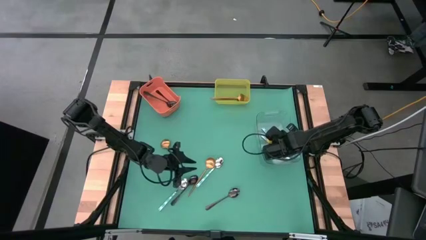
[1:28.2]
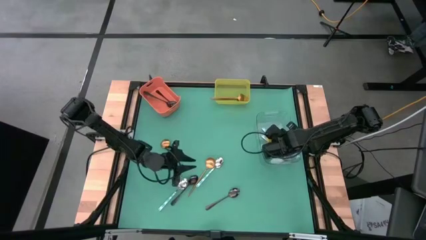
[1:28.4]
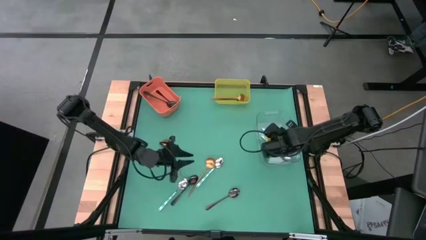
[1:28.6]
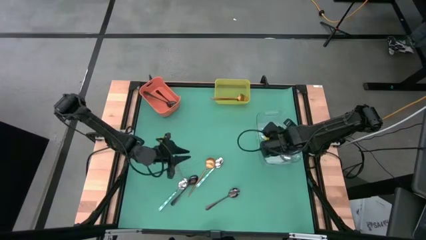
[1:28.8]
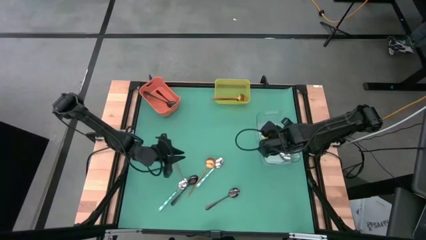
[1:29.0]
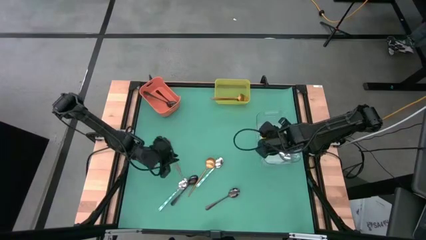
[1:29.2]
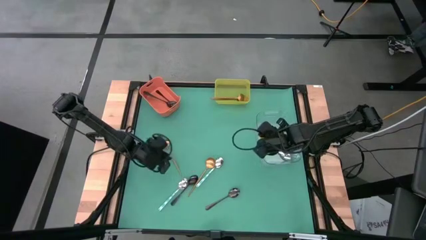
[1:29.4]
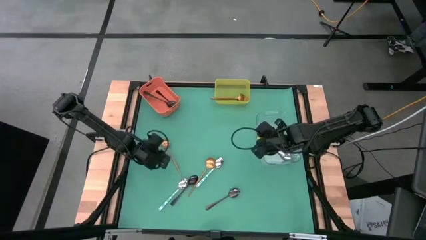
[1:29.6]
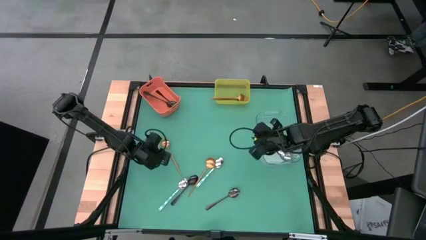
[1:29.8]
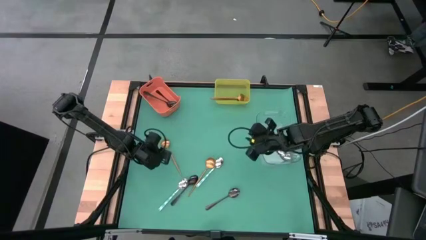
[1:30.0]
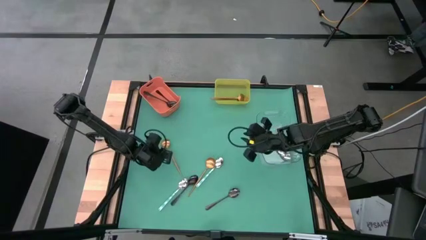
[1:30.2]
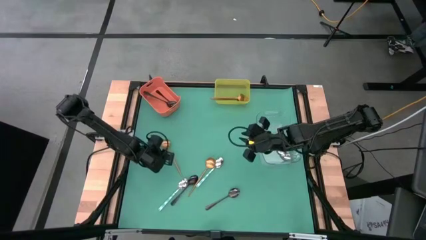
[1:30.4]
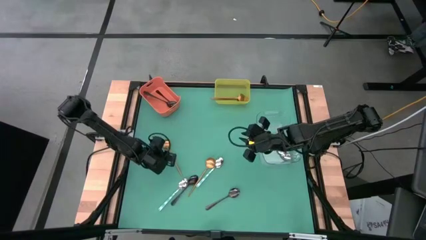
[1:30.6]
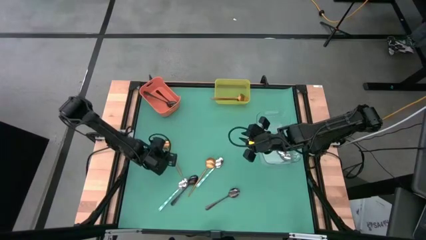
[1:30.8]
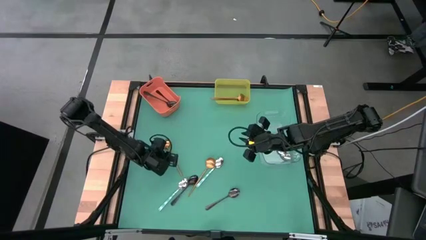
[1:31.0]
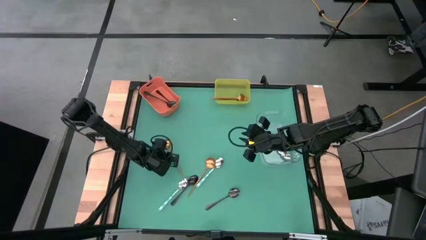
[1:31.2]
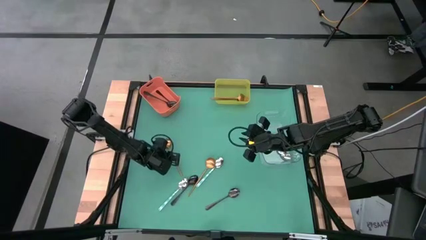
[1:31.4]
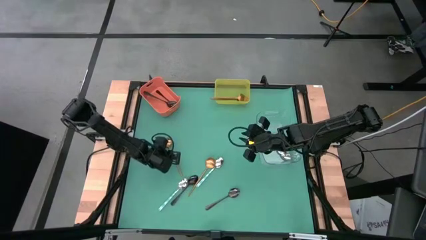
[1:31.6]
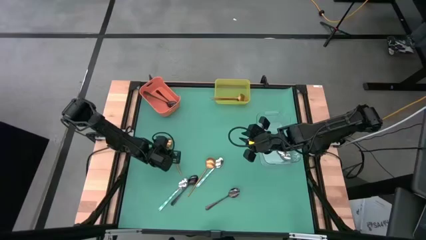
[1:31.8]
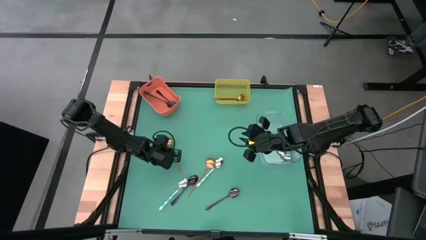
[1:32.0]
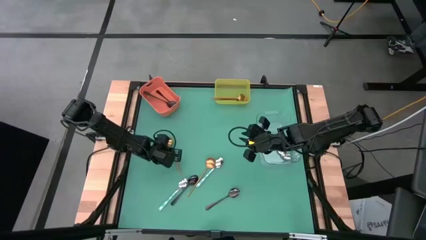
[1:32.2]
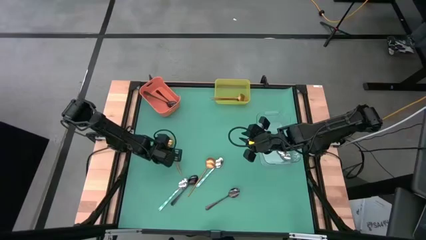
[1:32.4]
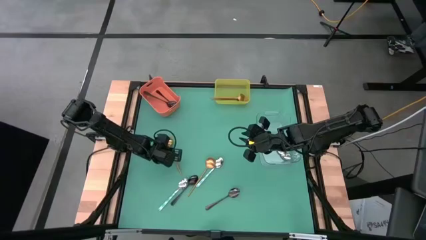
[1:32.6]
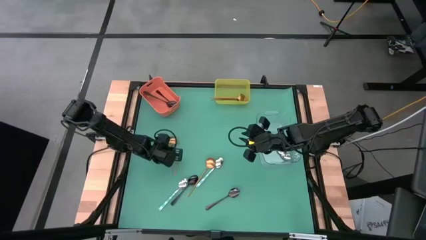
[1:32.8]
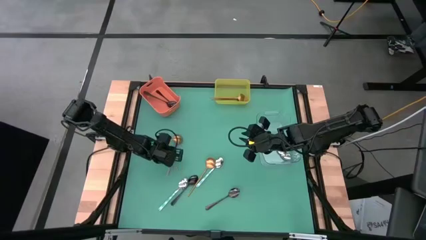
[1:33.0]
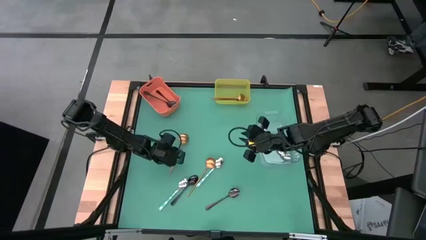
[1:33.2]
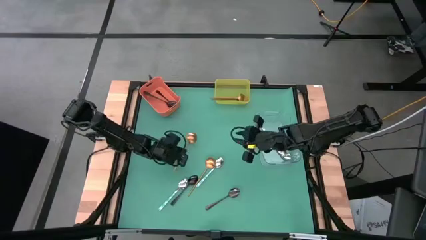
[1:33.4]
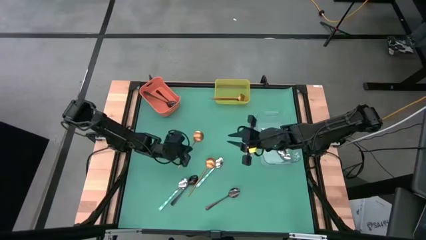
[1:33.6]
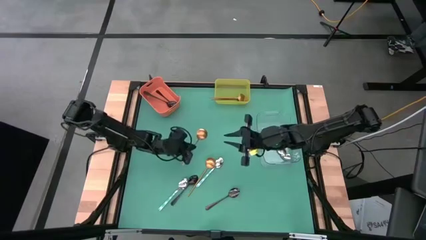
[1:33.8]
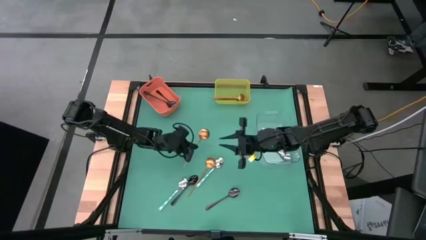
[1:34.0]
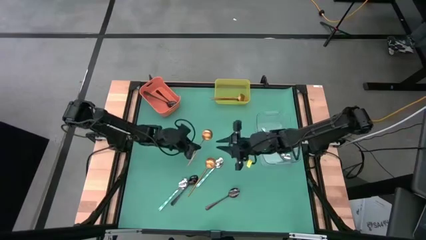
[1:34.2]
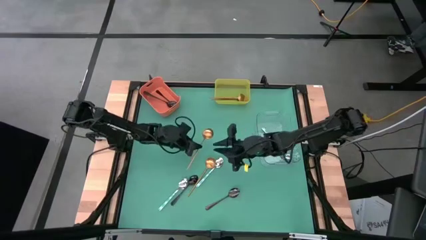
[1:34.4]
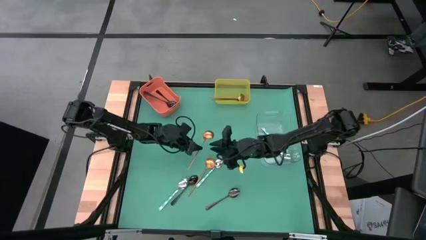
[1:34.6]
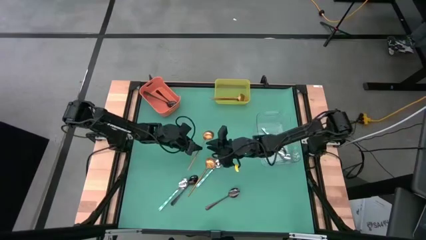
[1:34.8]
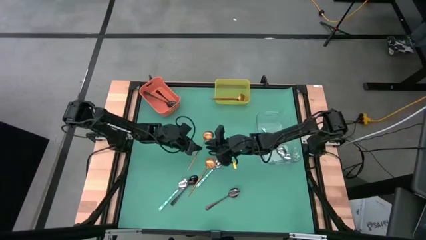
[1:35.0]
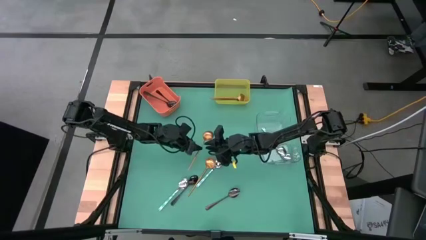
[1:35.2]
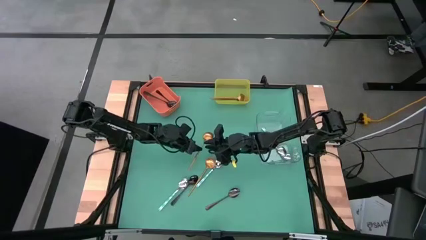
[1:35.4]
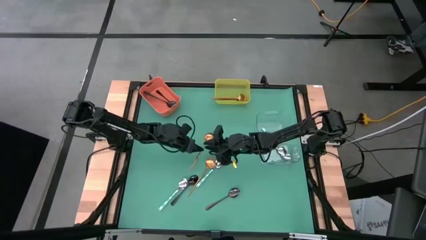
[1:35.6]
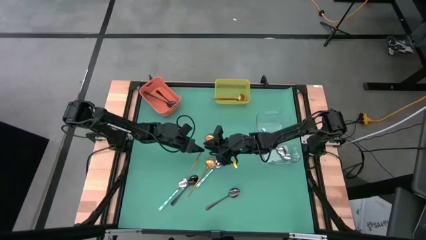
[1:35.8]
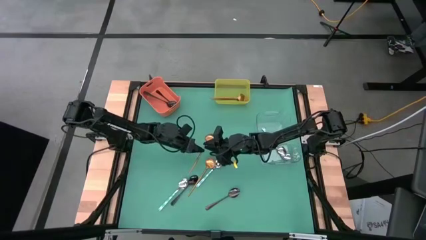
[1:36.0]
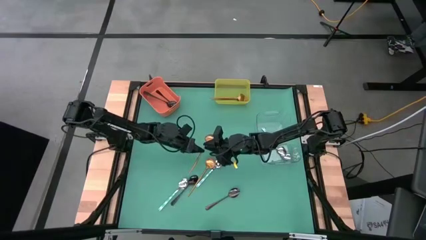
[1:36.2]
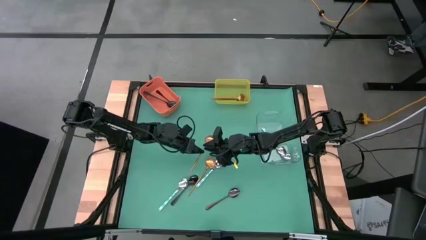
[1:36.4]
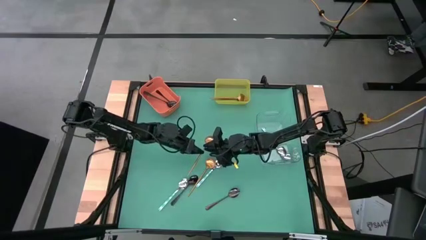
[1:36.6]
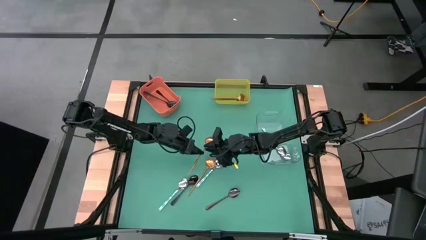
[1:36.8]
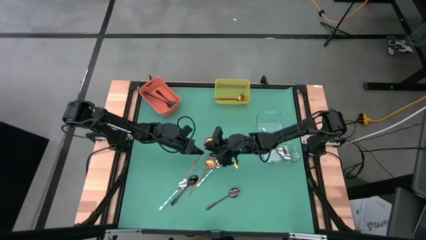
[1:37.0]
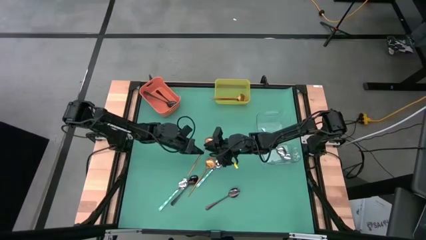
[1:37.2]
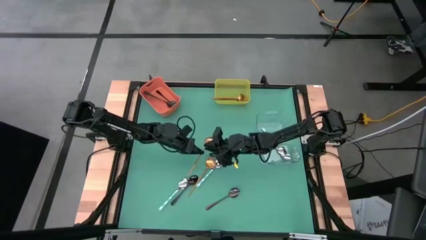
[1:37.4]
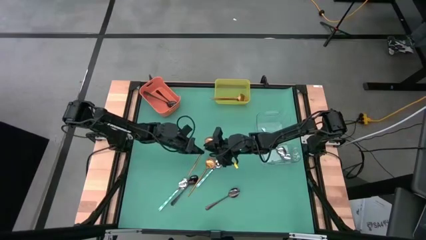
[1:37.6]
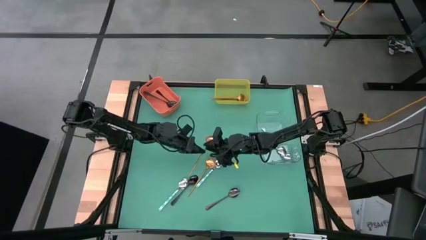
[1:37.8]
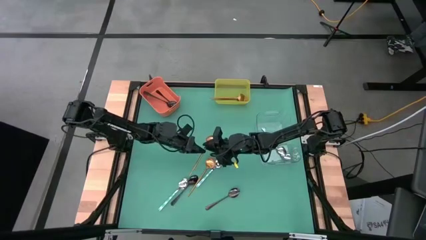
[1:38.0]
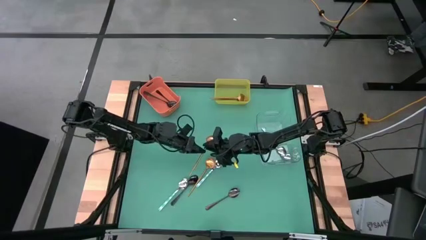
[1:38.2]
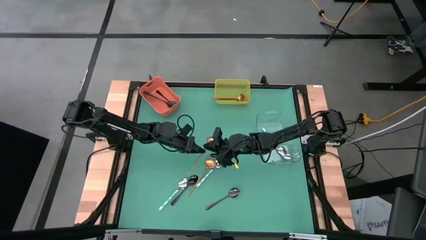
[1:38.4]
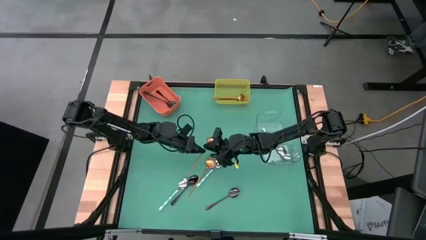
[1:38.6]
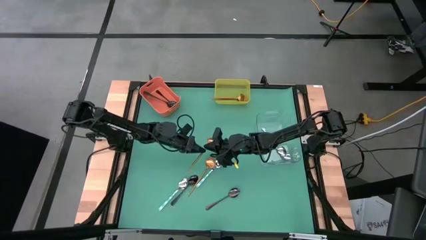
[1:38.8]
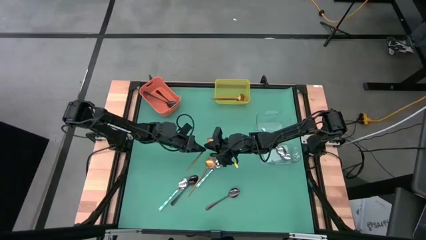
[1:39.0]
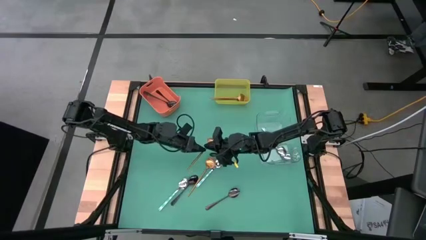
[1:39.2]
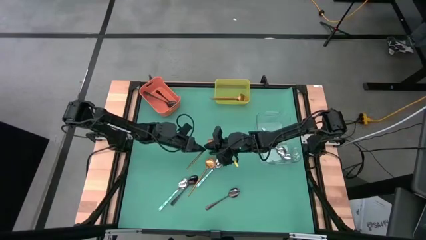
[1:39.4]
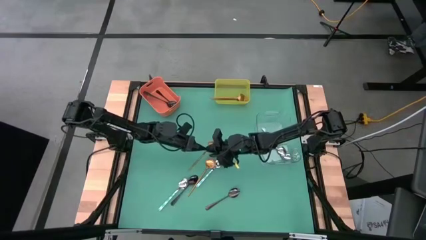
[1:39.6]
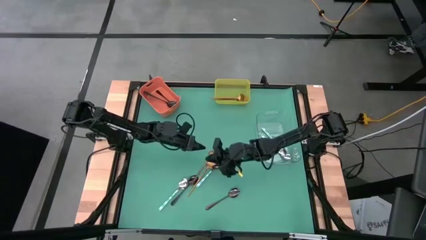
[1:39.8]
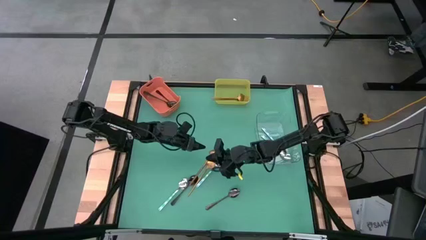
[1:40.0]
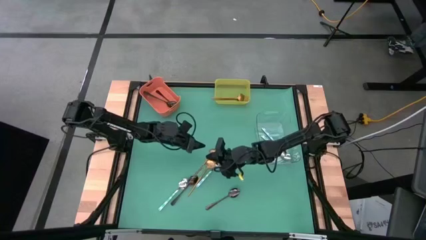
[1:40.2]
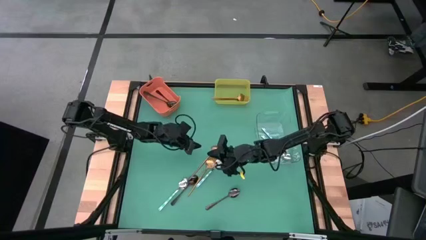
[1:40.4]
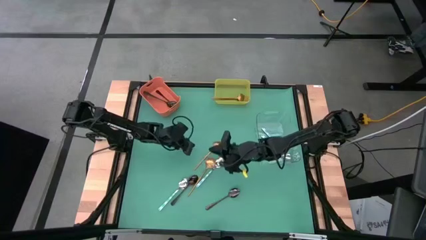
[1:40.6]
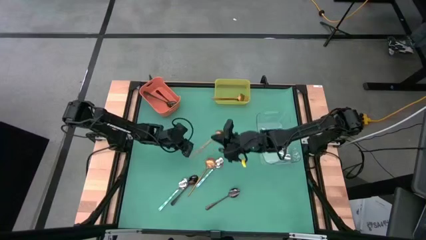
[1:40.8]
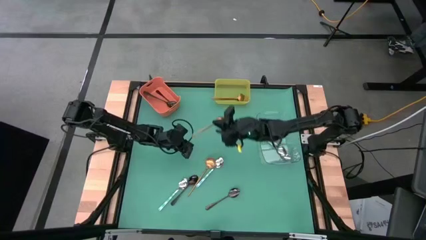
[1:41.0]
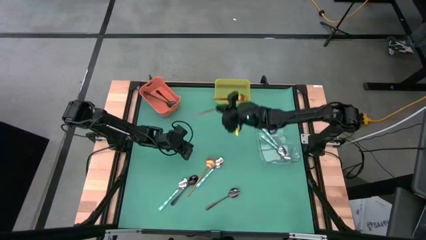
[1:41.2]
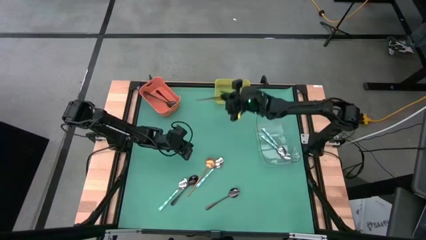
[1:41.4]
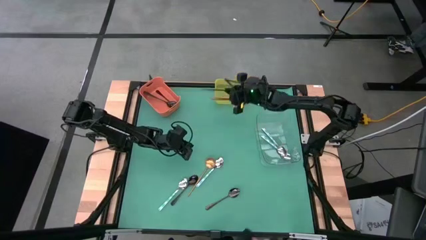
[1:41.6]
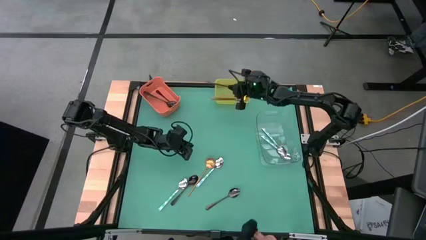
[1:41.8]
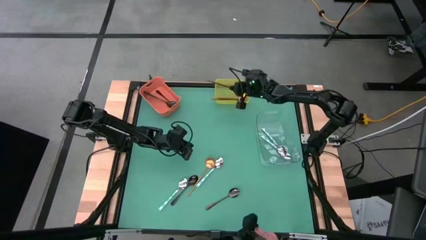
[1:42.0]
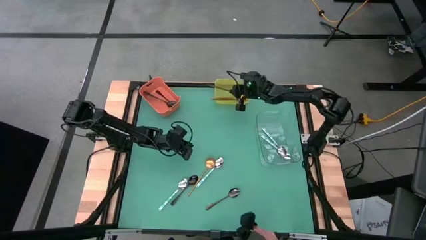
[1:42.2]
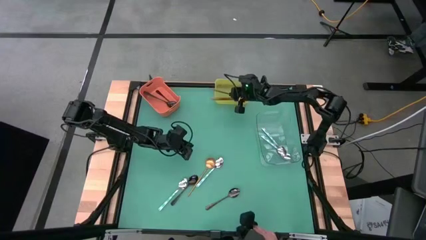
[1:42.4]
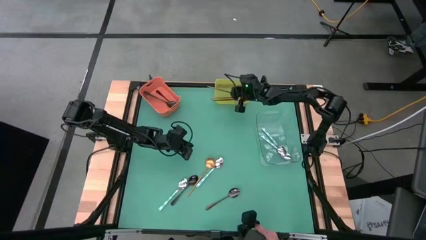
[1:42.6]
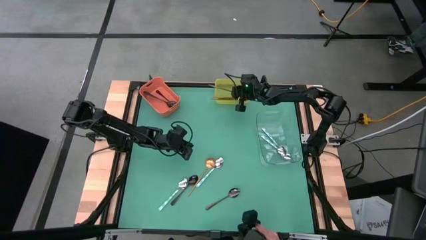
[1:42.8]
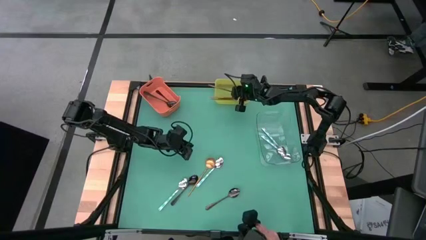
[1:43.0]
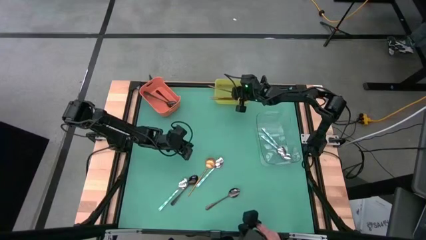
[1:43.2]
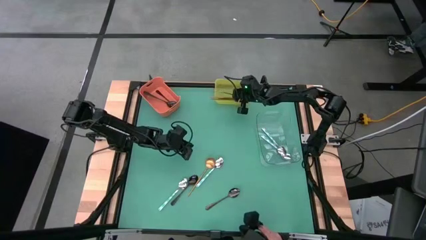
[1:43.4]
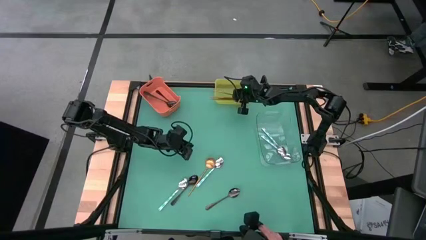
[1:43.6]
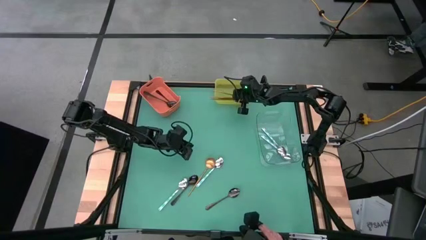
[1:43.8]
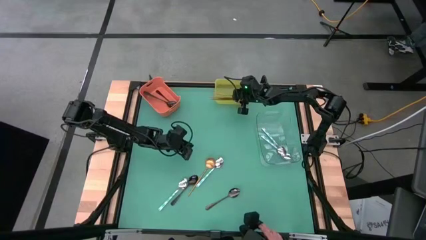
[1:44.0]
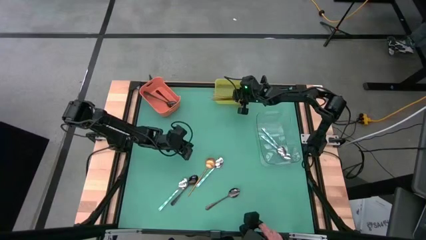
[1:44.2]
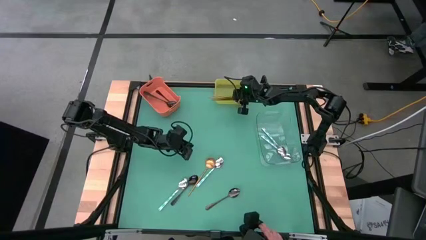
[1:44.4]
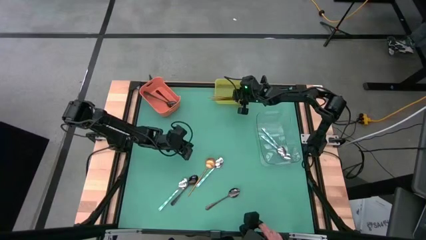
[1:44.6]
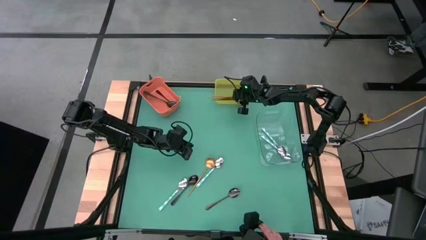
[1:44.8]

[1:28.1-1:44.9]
Task: Sort silverware by color (type)
Put the gold spoon into the yellow bin

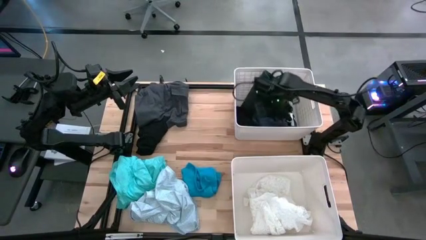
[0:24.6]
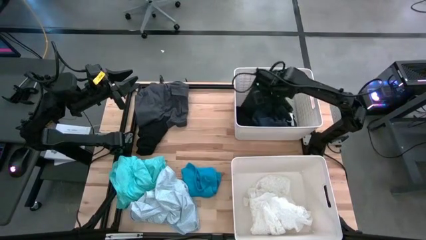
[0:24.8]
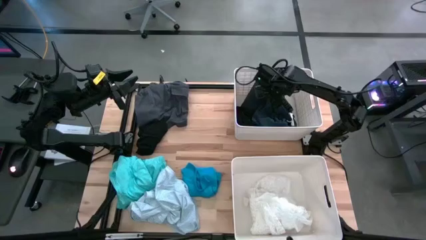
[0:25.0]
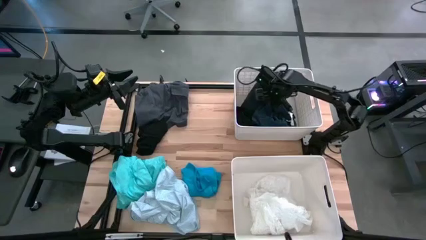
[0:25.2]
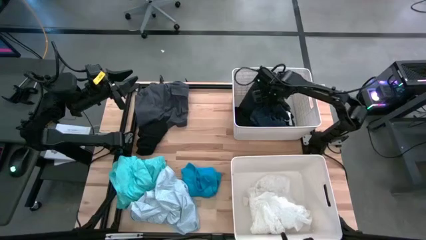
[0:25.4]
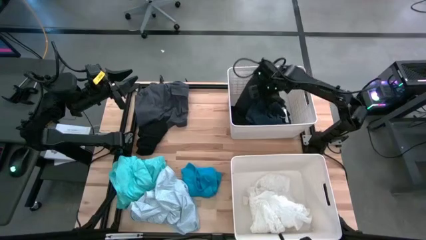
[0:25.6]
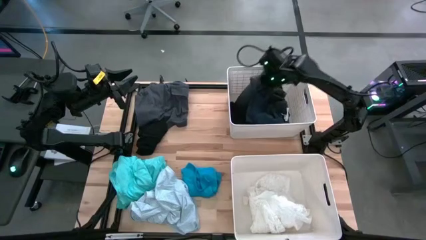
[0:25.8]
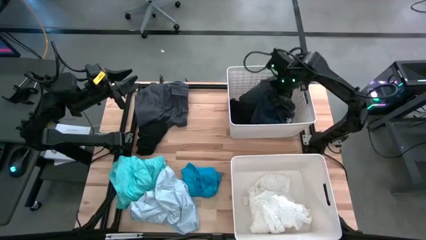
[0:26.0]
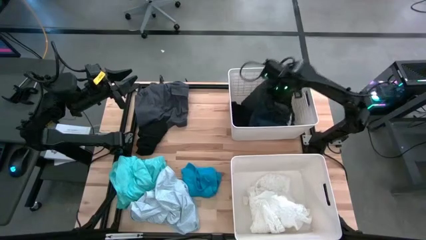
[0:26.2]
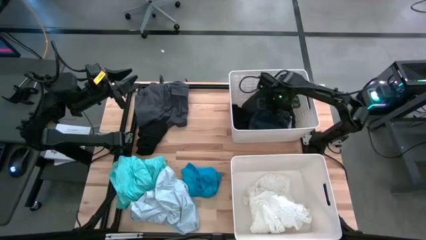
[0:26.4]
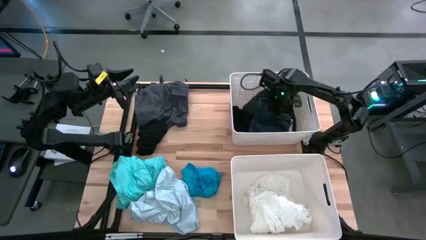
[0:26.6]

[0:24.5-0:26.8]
Task: Sort clothes
Adjust the dark blue jeans
